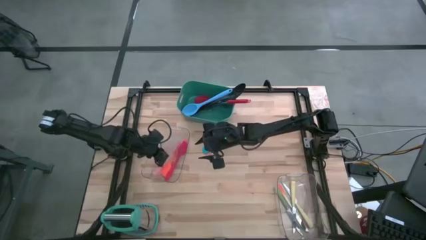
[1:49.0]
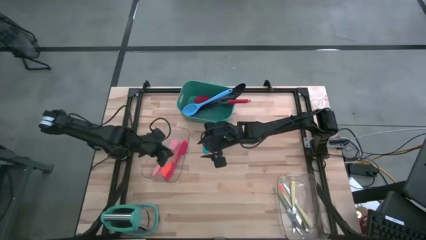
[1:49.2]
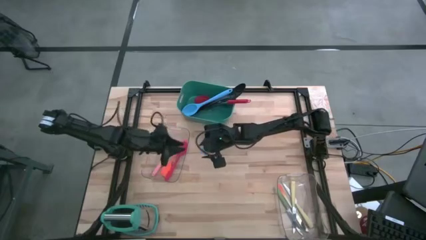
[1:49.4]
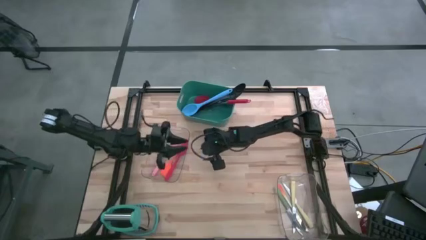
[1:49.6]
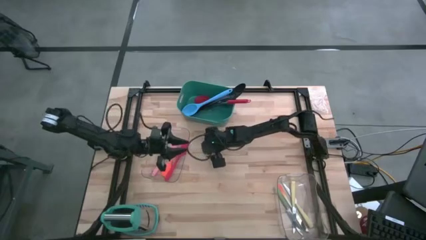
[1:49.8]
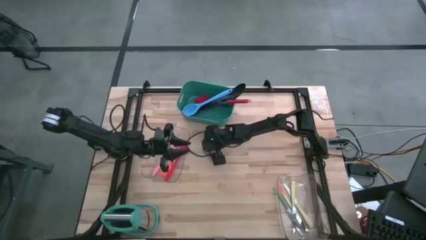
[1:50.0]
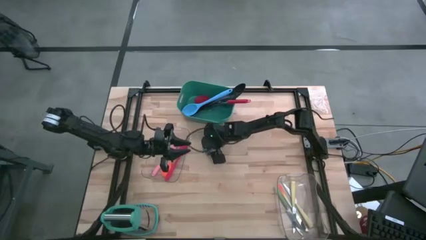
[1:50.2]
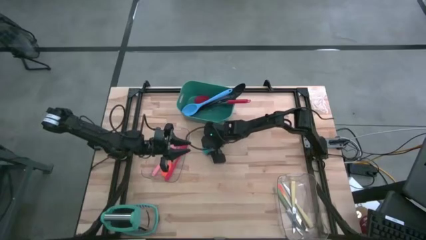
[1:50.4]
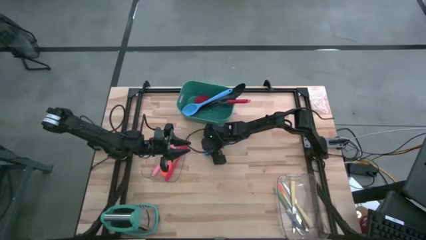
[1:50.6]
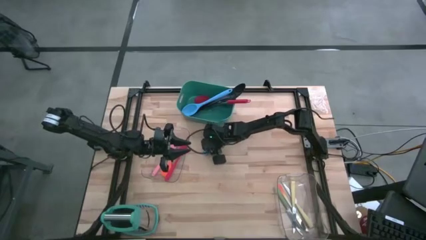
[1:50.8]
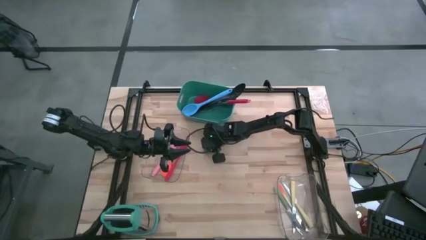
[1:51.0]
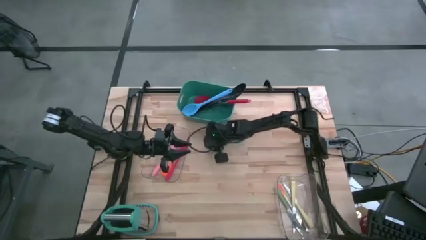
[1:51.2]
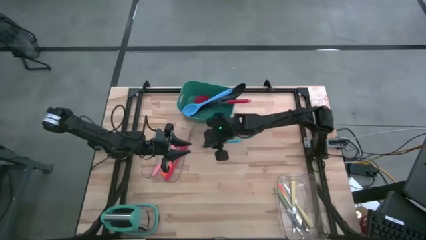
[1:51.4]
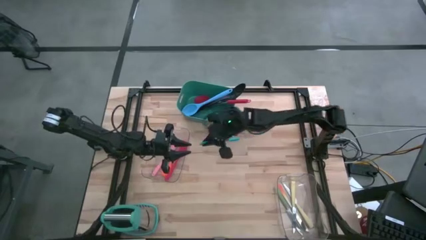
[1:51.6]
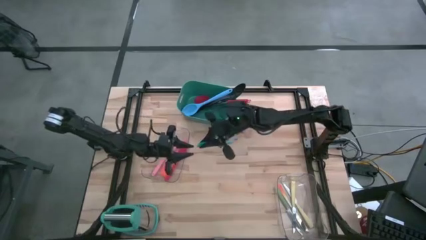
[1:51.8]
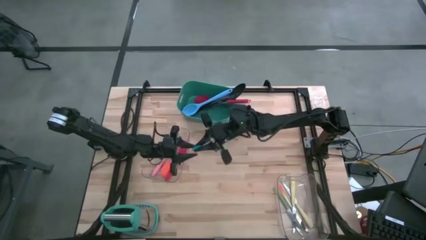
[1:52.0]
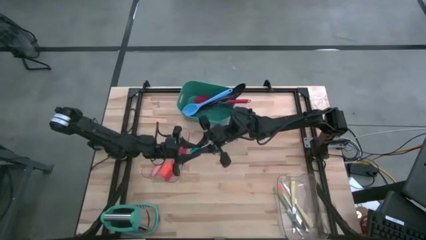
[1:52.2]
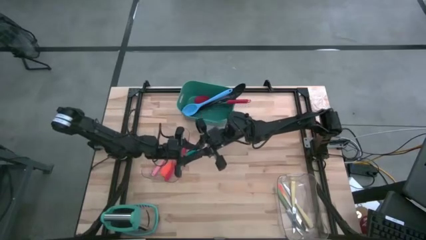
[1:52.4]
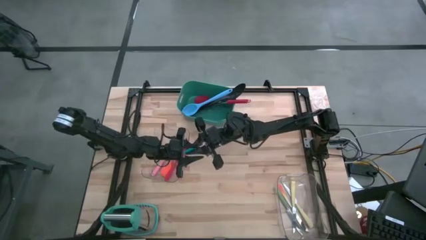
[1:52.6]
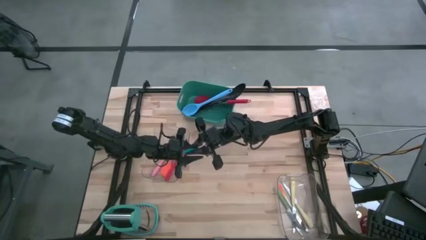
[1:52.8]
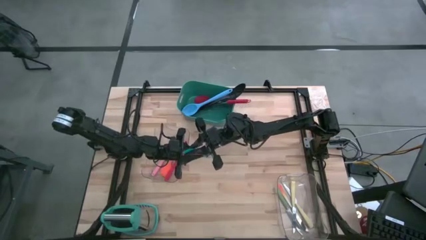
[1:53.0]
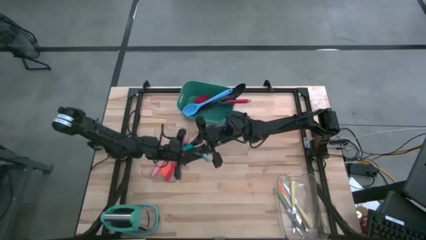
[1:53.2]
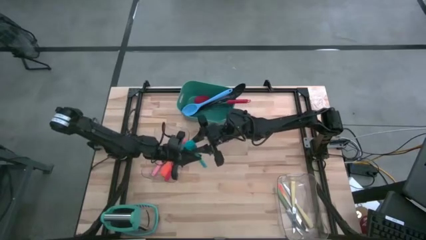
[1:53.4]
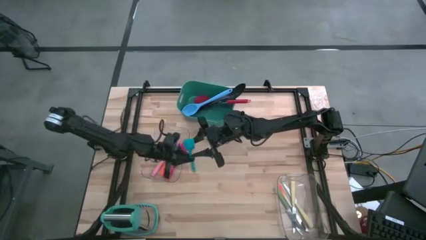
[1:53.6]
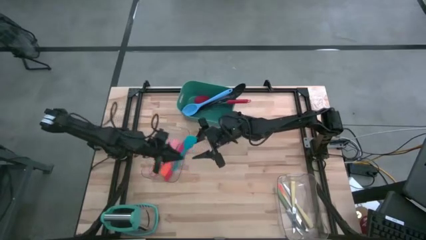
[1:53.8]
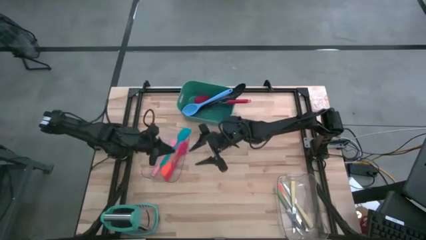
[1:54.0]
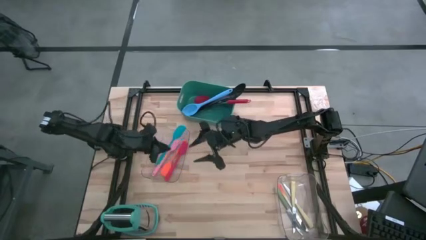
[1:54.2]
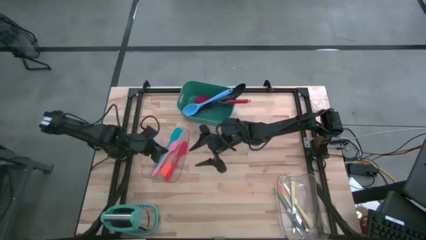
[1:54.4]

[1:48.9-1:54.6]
Task: Pick & Place Kitchen Items
Put the blue spatula into the left transparent bin

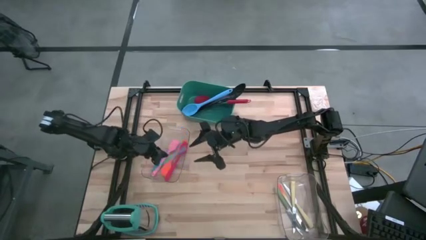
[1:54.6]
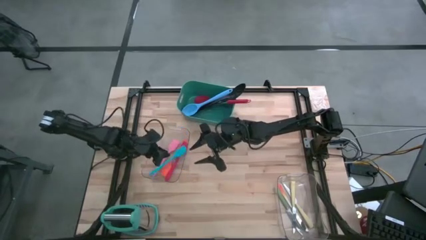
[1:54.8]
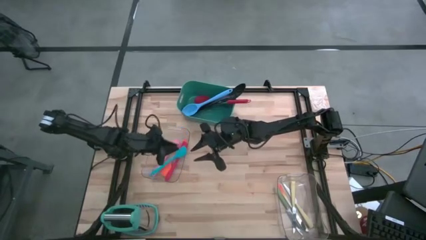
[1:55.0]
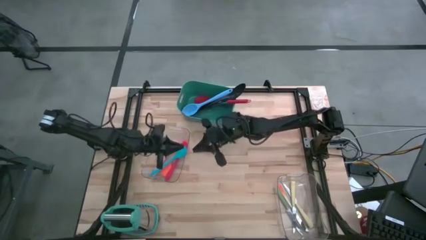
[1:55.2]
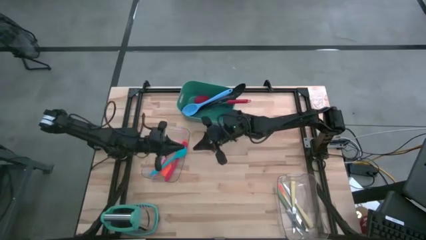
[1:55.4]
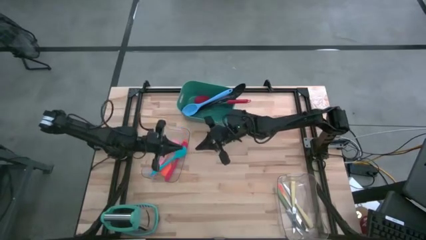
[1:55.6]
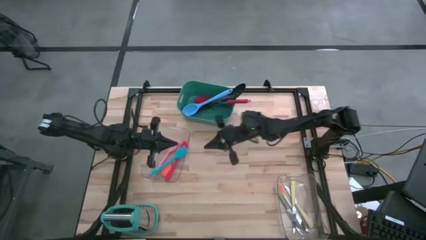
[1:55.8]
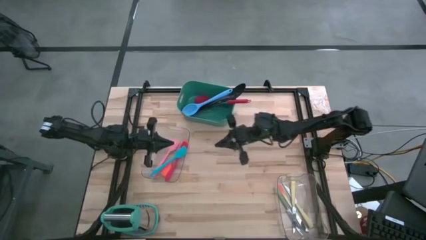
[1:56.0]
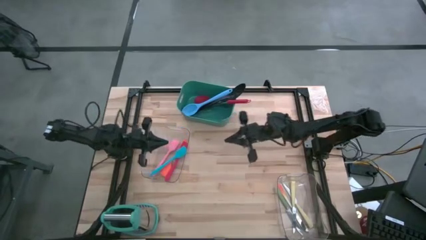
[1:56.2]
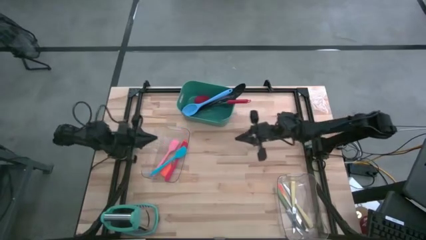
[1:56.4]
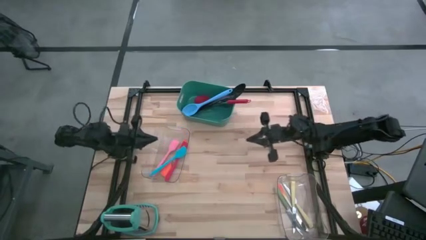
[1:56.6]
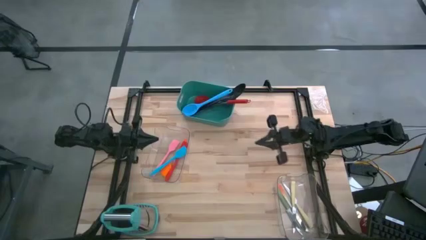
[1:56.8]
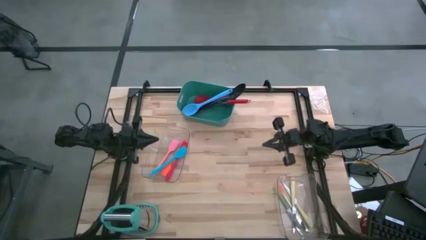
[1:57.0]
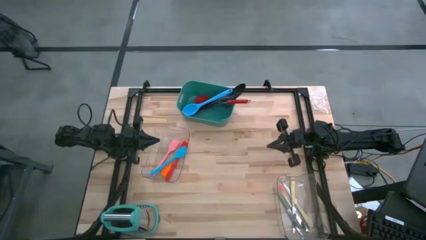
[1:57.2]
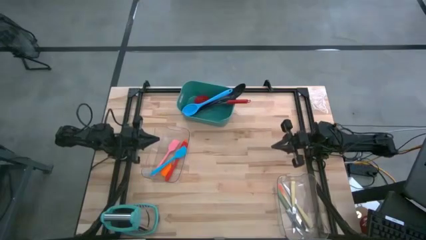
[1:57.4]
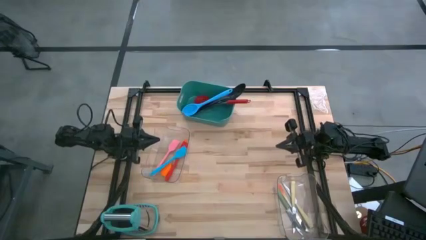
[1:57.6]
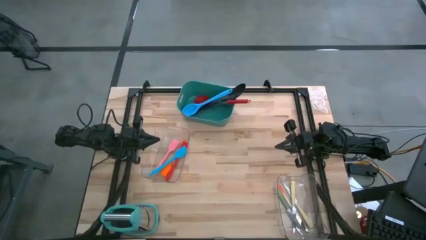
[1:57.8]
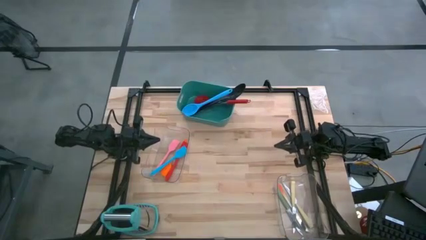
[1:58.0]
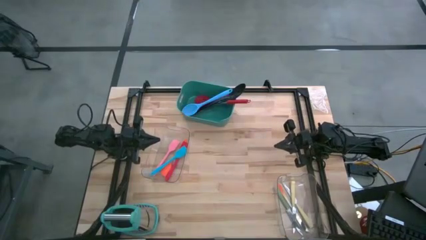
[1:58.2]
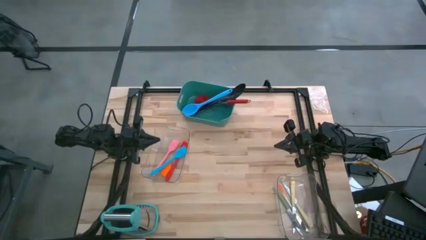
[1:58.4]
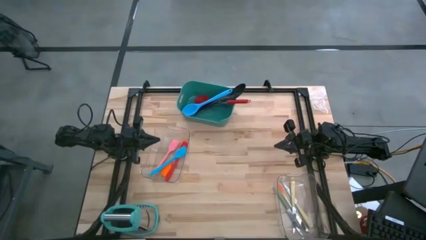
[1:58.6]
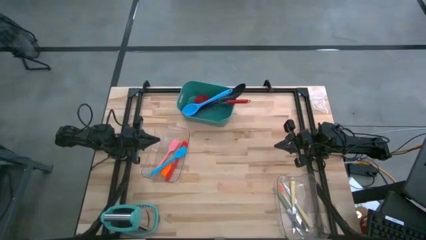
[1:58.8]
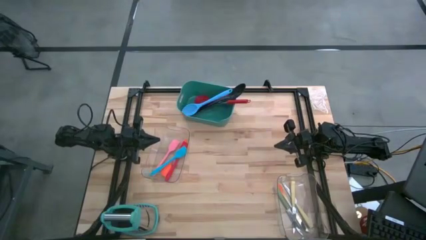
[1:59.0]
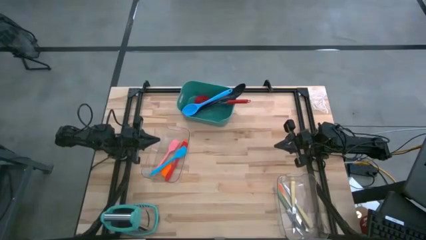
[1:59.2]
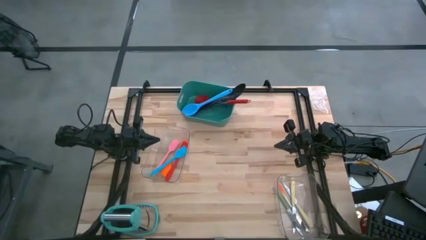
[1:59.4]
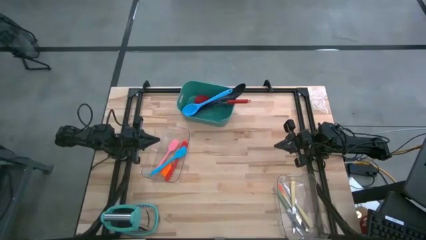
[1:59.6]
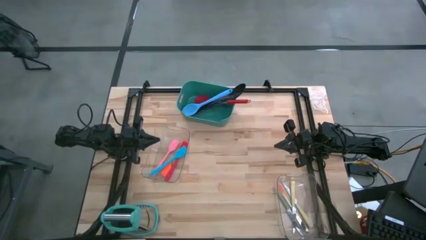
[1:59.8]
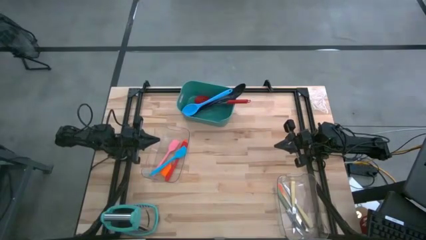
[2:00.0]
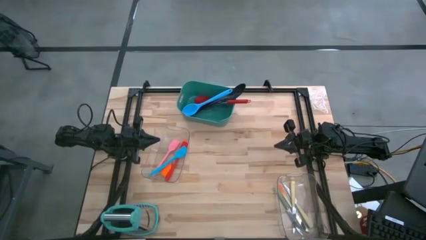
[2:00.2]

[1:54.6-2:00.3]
Return to Home Position

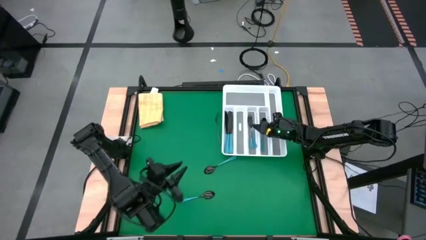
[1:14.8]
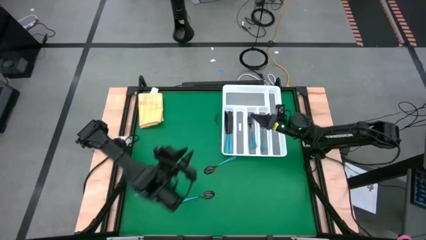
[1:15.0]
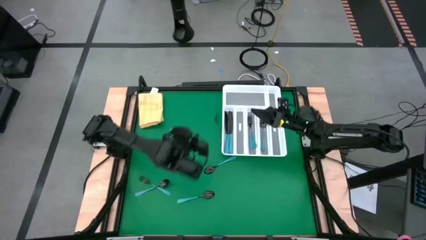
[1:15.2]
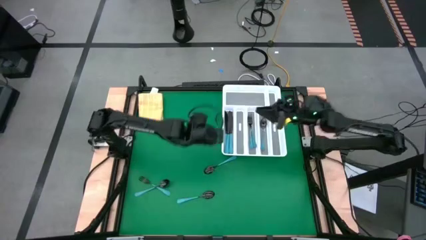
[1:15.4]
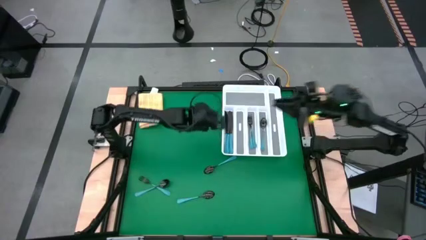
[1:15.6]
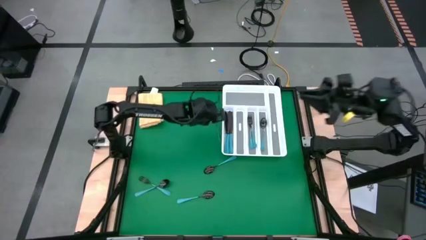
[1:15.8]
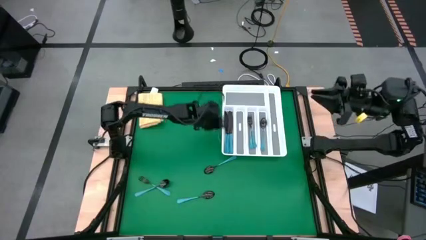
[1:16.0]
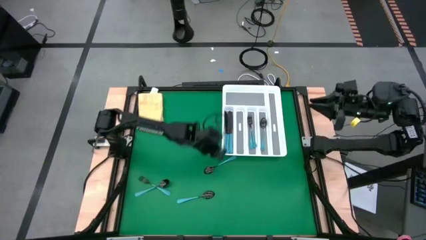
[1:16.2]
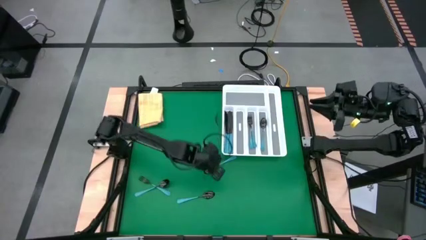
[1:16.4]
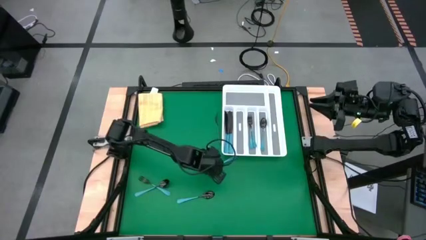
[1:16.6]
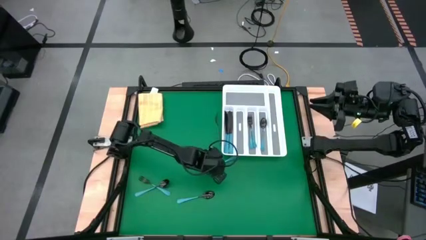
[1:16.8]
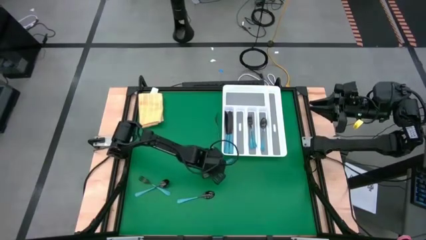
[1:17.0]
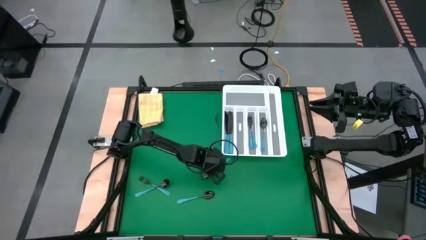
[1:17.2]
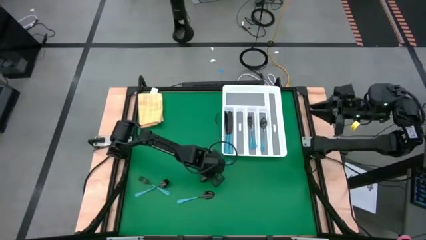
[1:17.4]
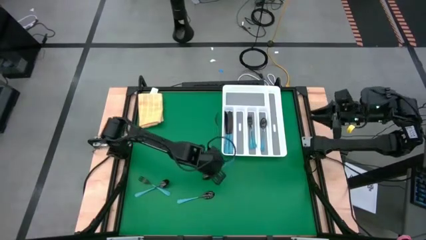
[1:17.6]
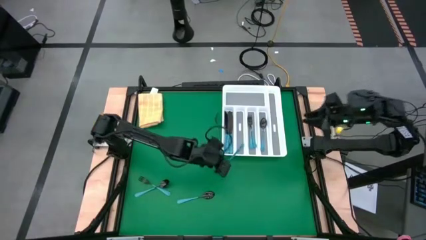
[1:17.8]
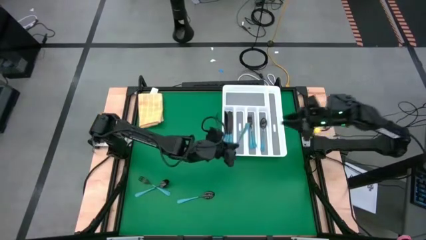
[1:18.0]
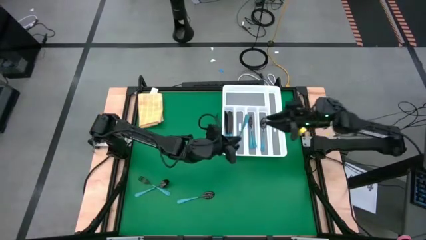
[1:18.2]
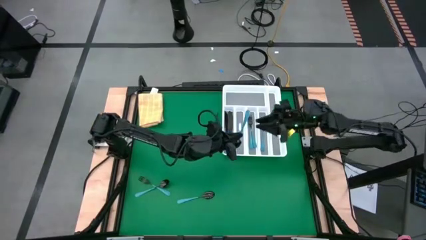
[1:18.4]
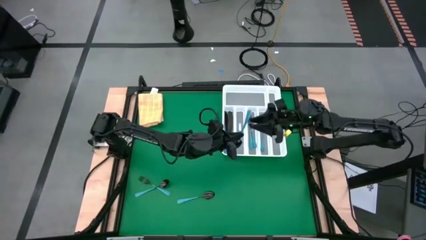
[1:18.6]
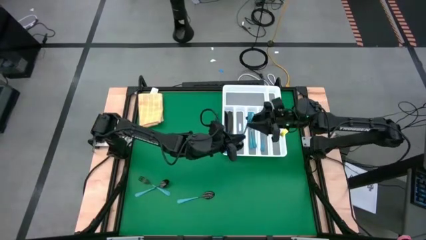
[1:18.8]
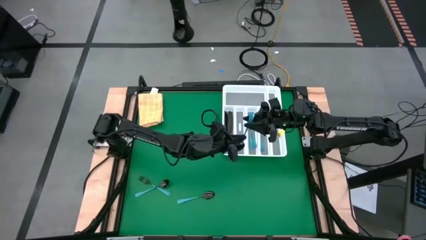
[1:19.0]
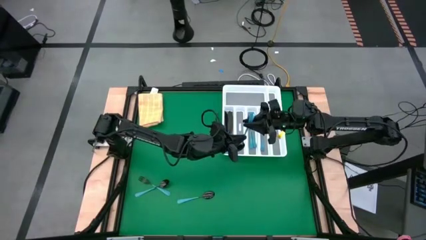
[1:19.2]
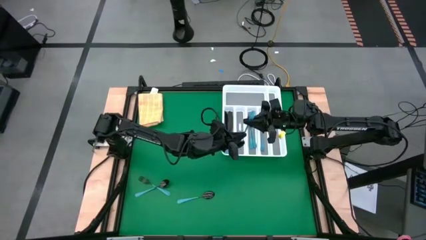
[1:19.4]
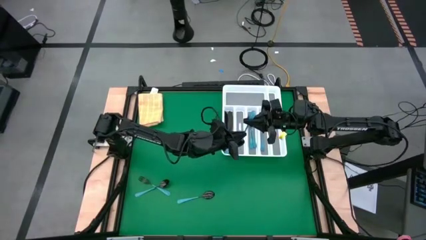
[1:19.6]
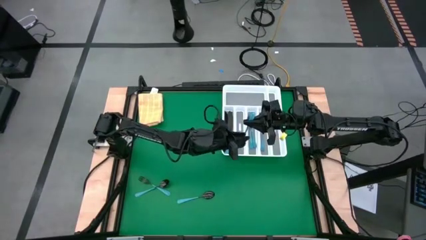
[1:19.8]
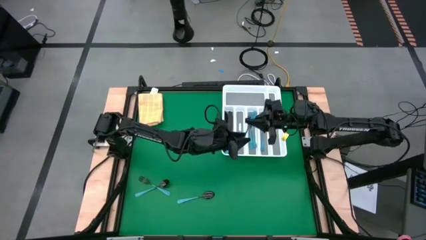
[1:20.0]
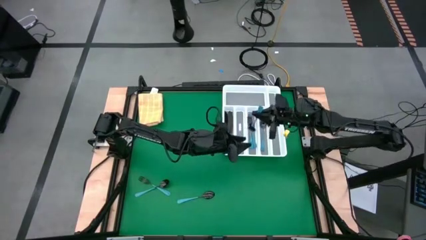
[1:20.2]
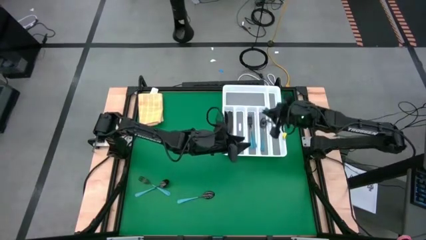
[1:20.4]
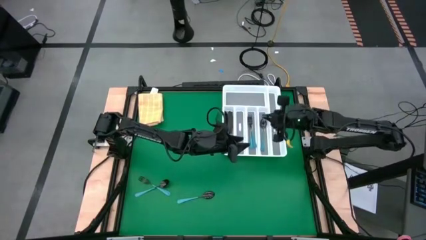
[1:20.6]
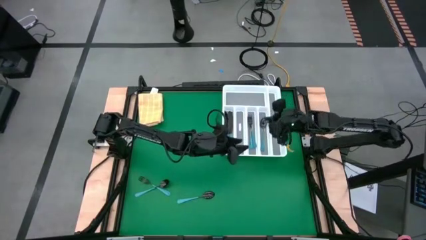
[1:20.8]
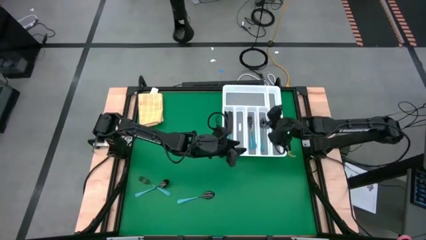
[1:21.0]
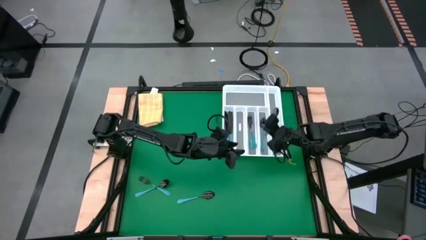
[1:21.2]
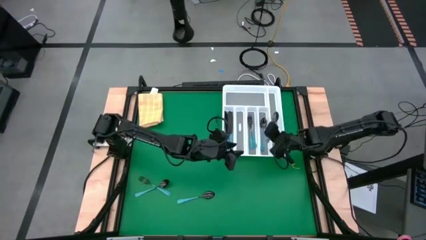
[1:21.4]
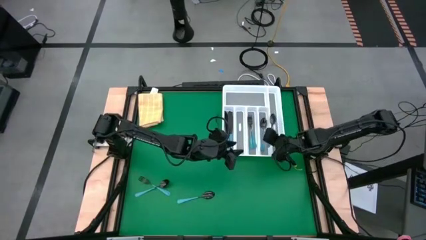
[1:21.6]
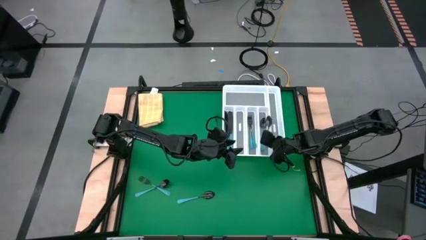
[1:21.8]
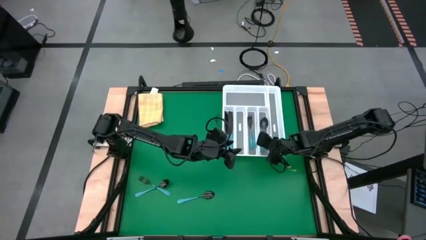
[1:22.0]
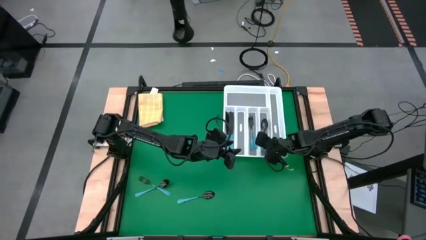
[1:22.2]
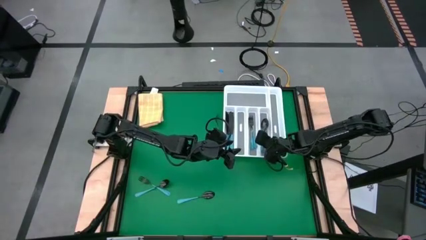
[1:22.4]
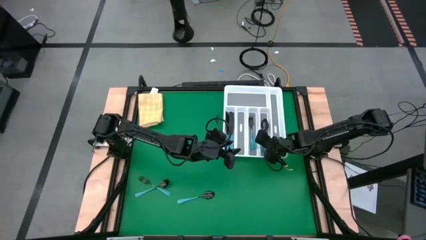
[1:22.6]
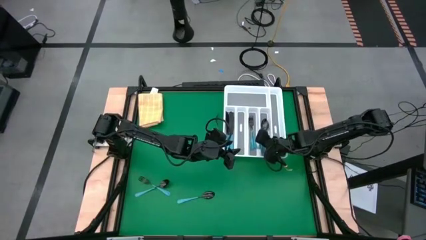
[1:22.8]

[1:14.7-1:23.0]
Task: Sort silverware
Put the blue spoon into the white cutlery tray
